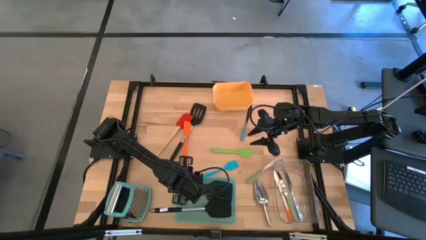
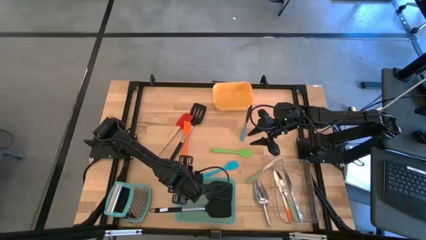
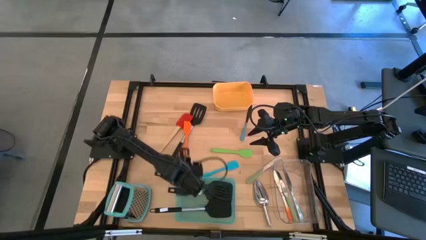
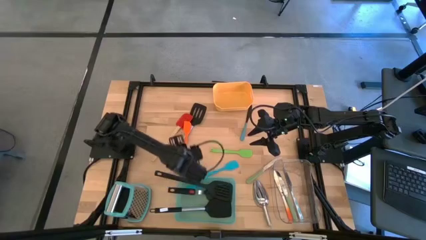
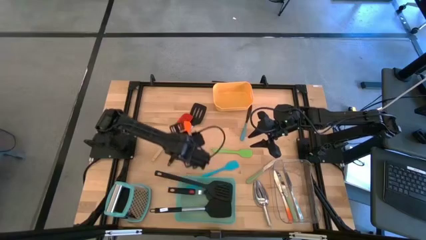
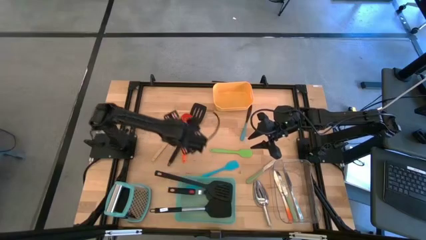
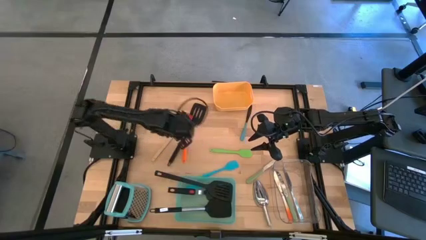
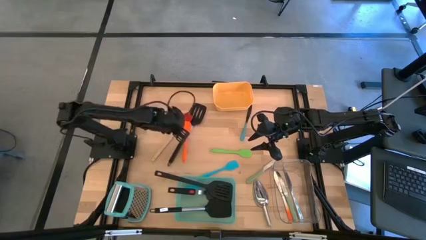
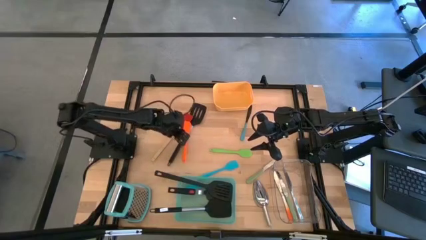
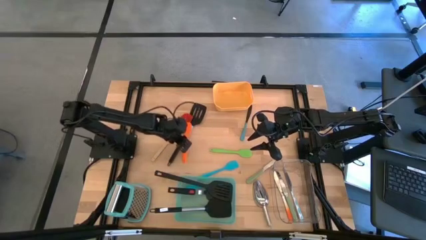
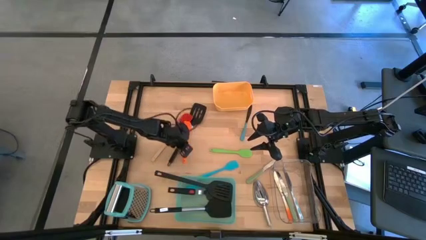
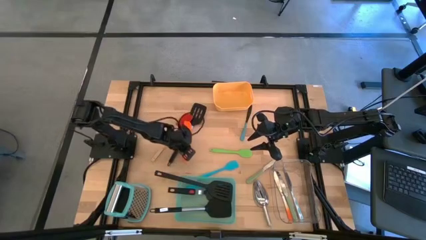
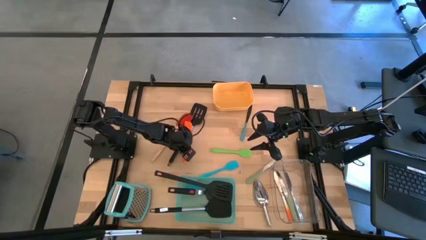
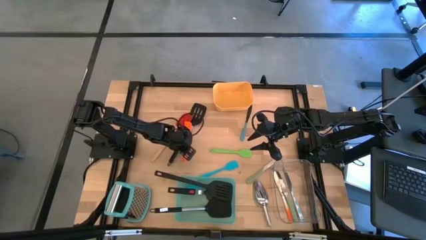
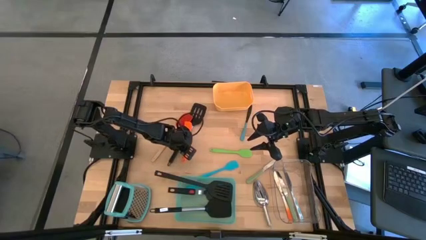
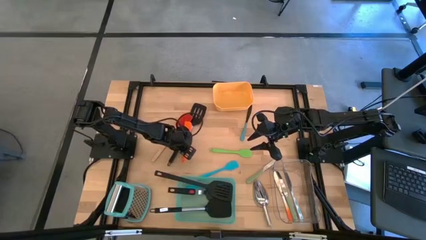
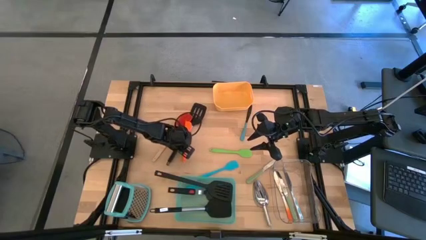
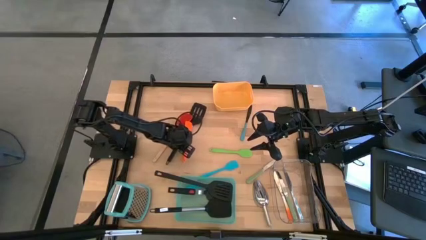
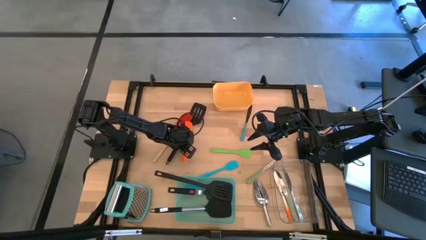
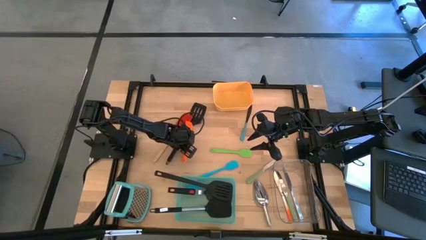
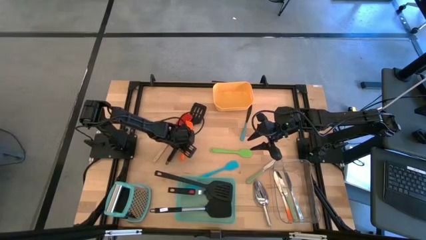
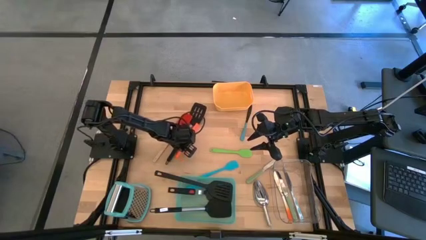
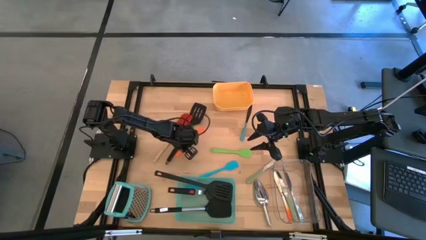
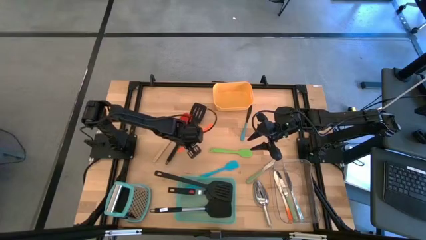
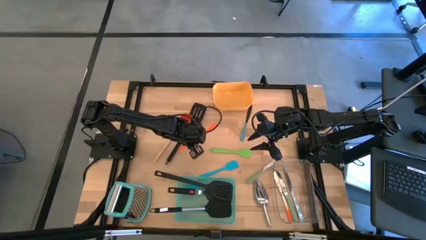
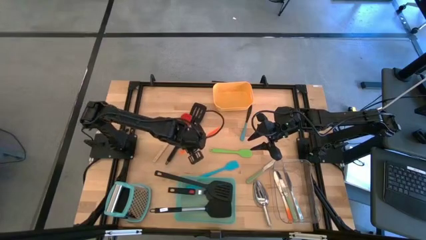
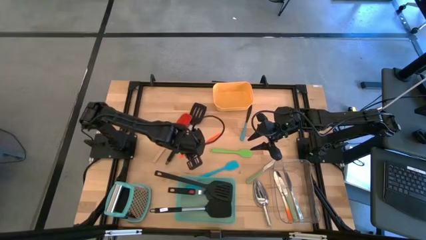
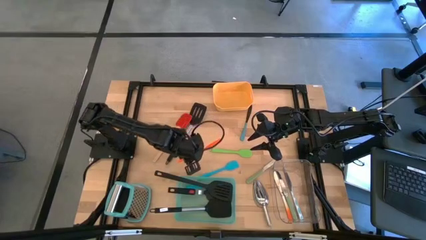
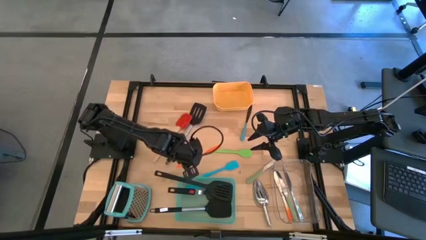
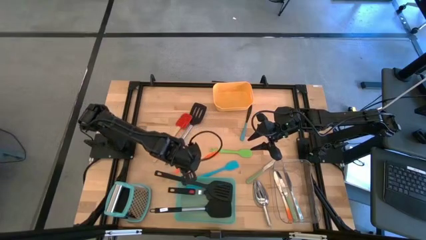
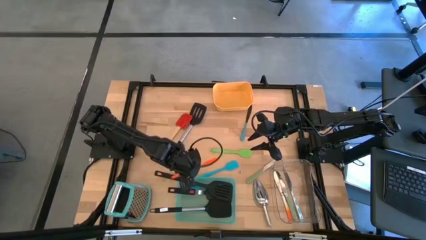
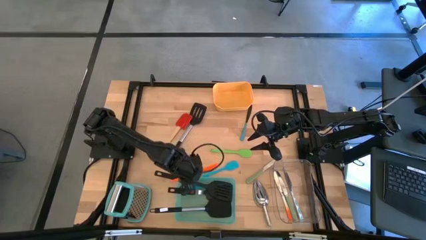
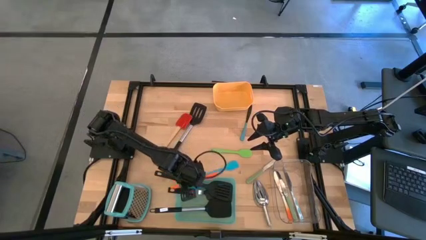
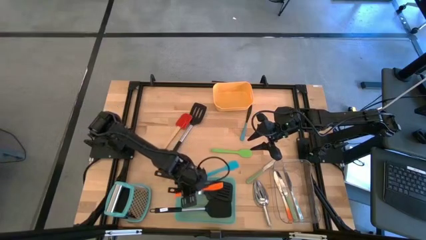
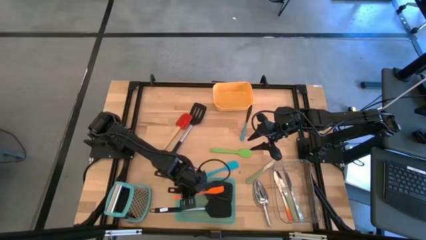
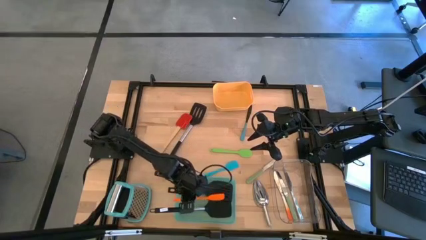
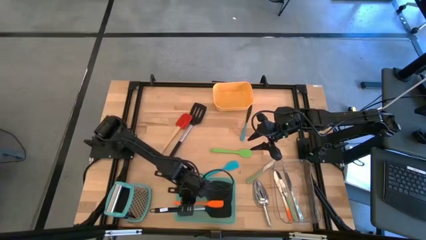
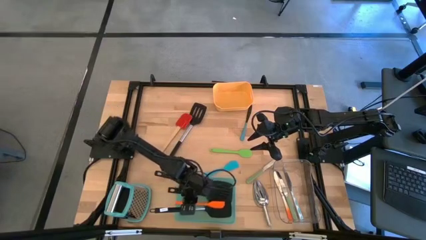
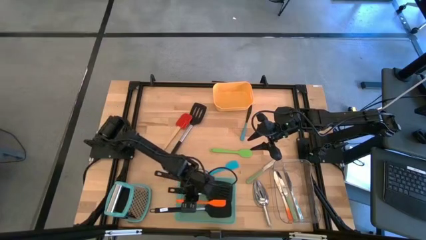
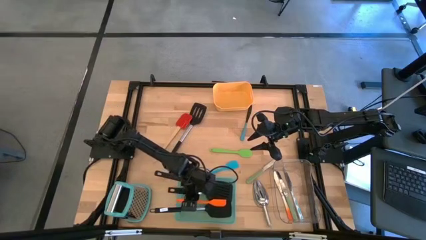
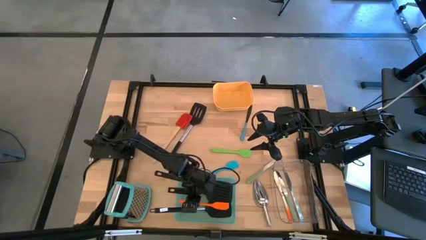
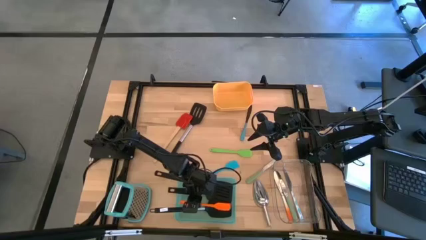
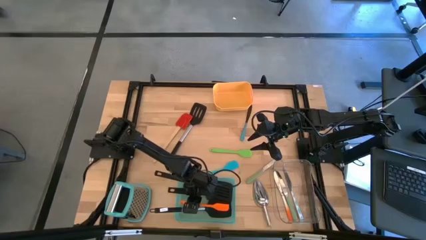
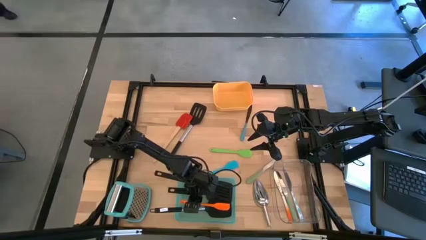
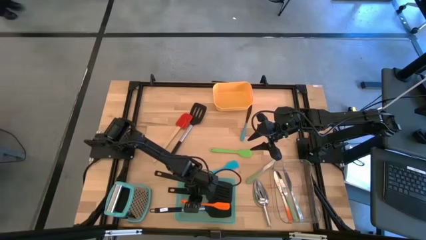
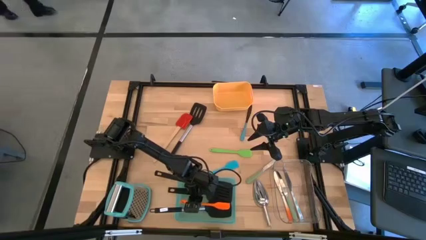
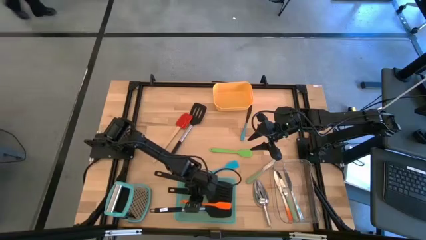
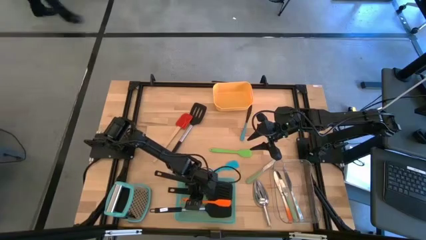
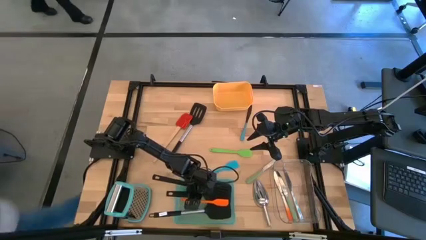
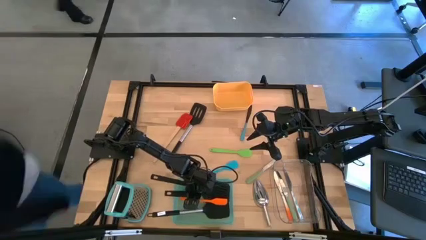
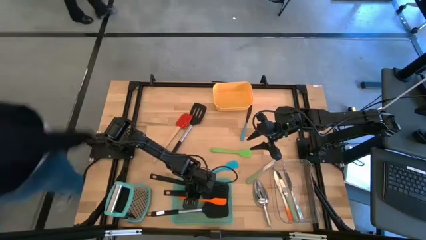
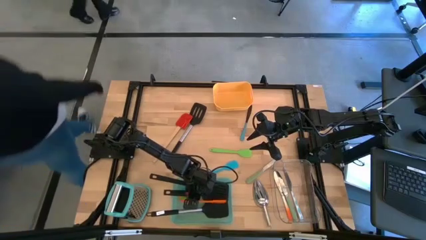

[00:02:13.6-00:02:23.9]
Task: Pick & Place Kitchen Items
Put the orange spatula into the blue bin

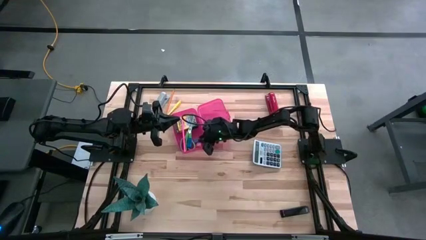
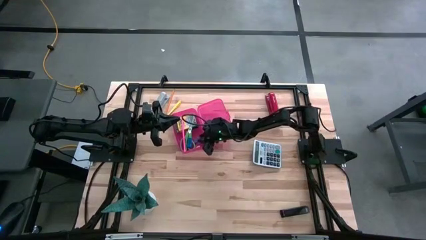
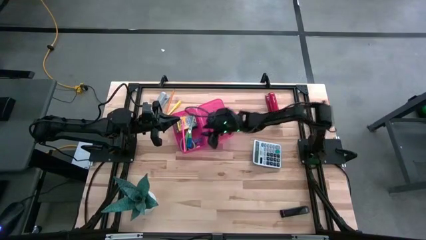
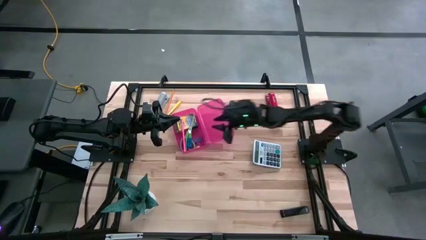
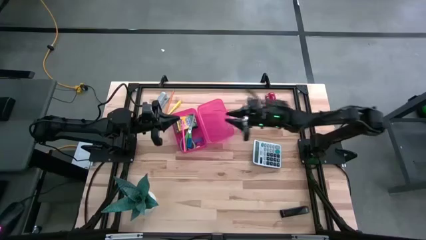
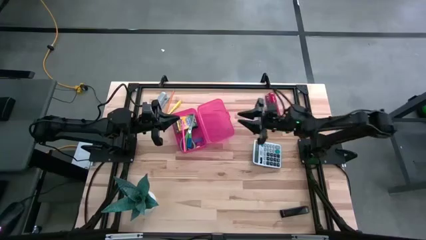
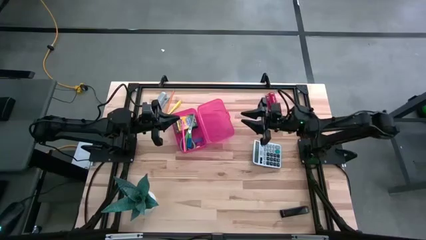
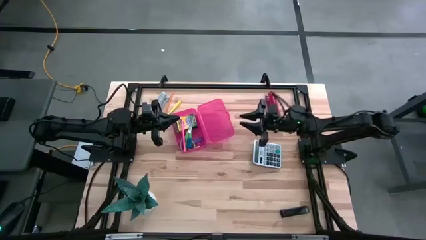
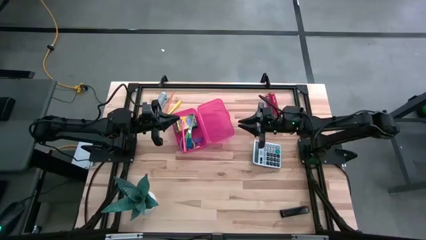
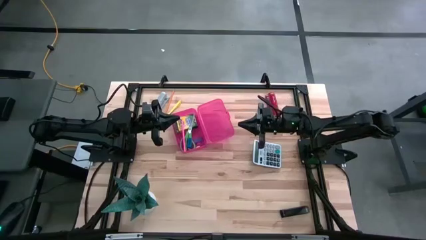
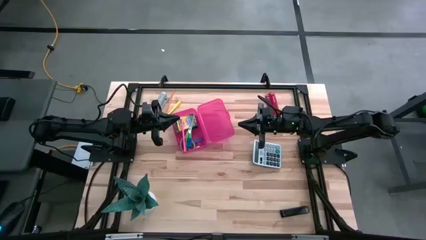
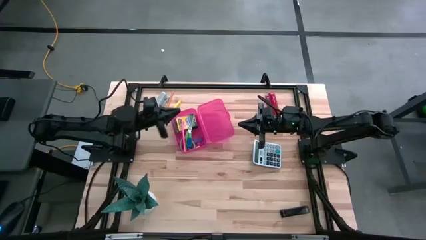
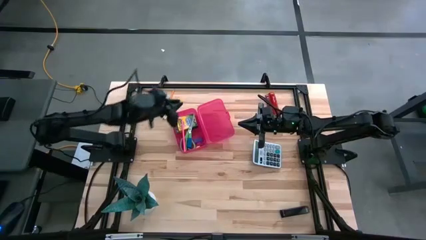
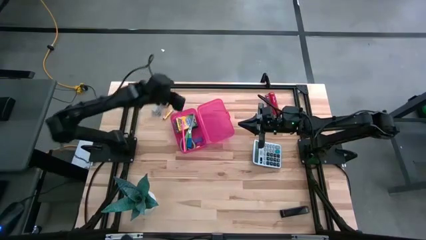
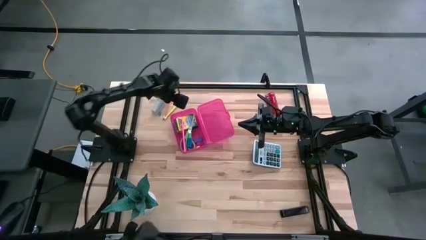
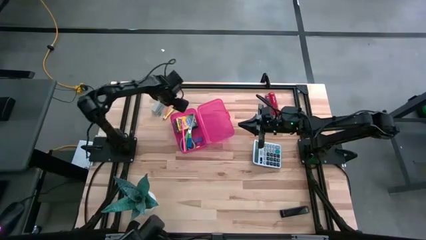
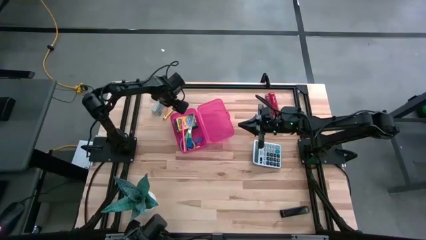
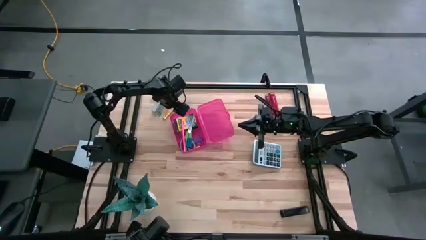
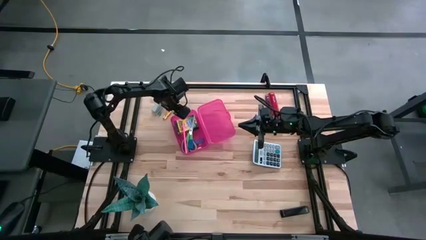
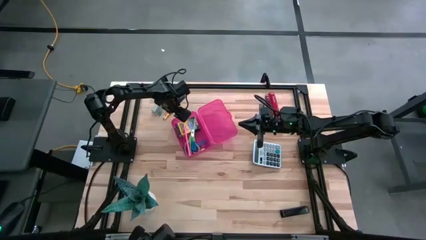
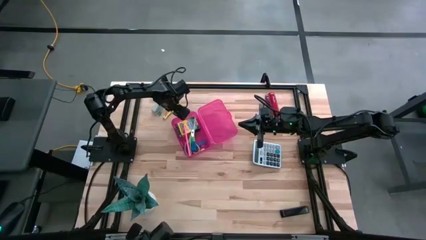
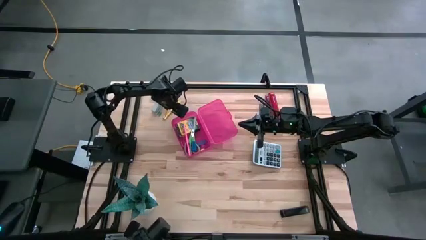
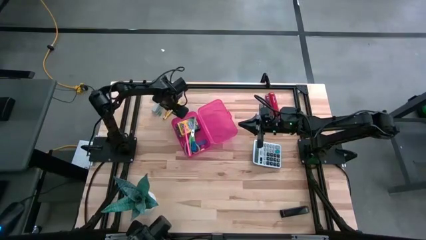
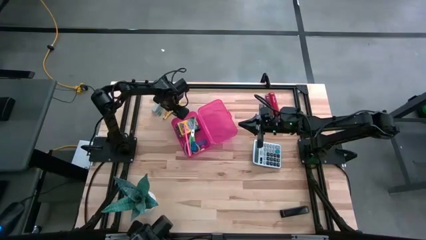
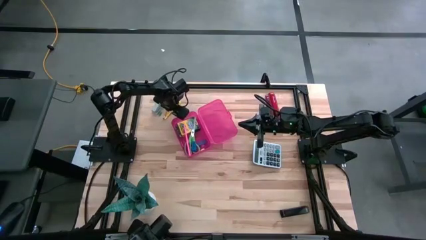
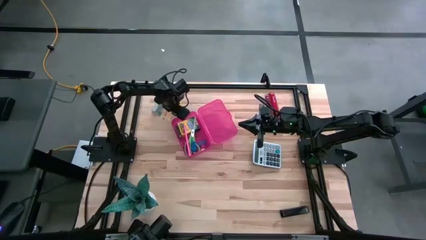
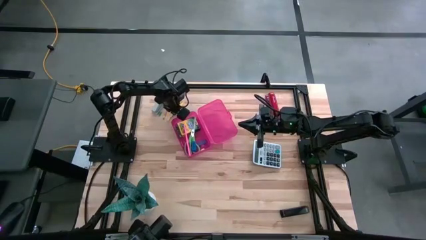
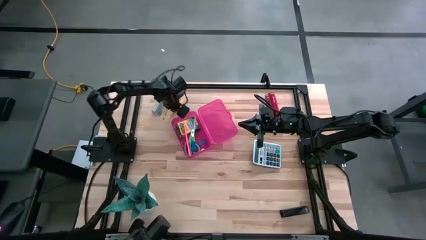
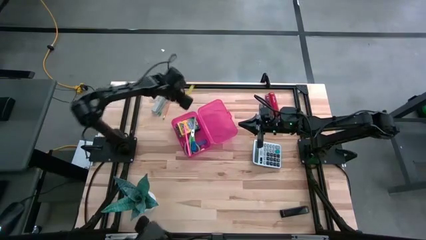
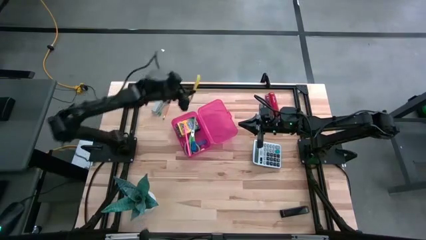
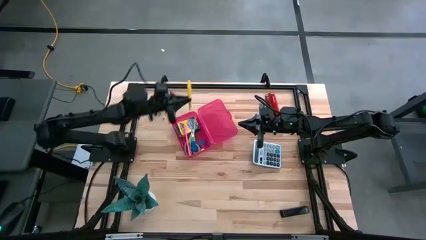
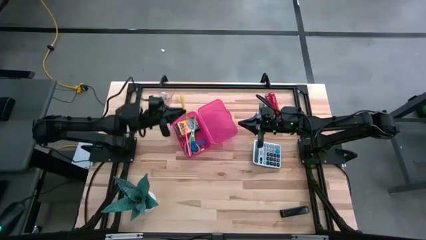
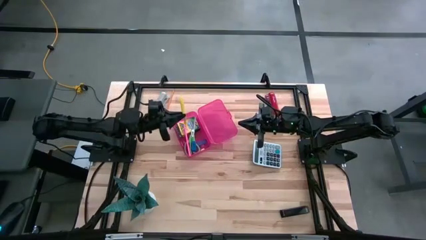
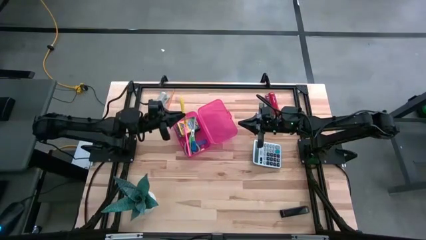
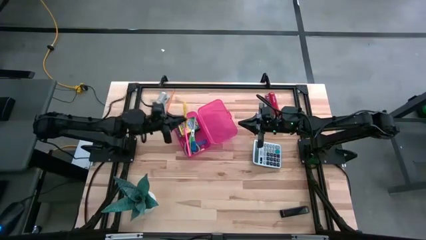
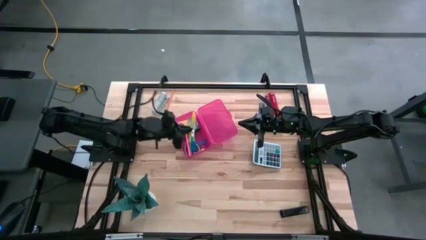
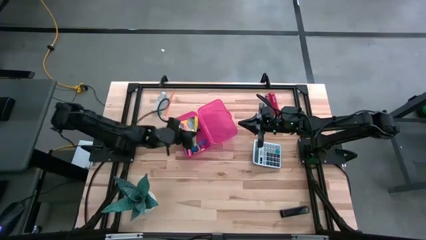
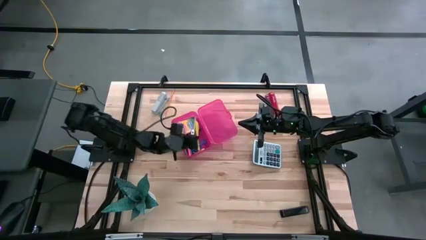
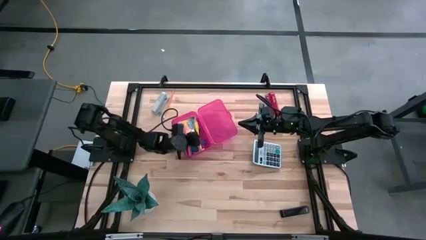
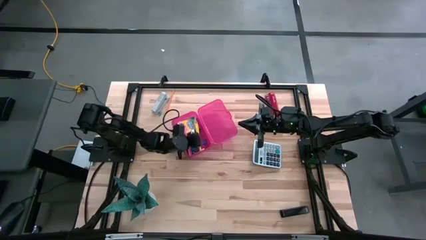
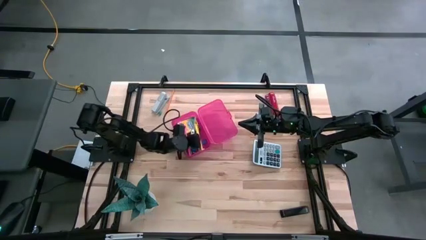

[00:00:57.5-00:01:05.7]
Task: Pack school essentials
Put the yellow pen into the pink pencil box
